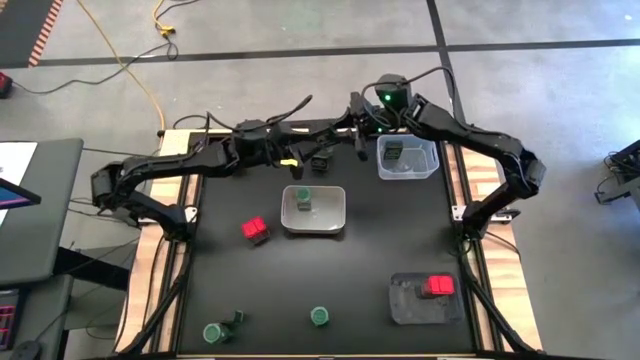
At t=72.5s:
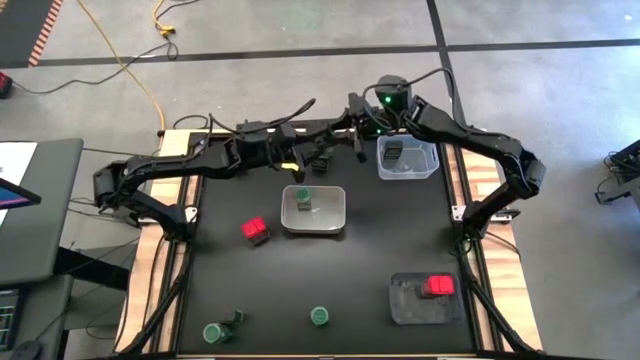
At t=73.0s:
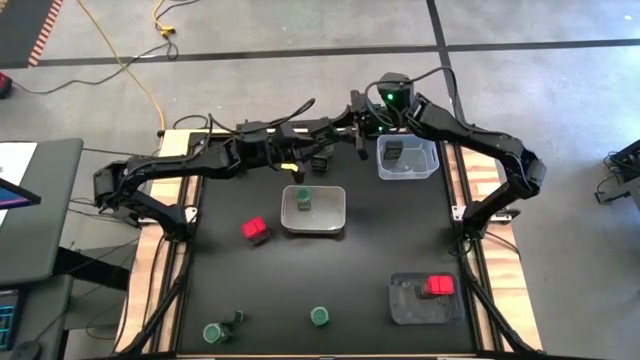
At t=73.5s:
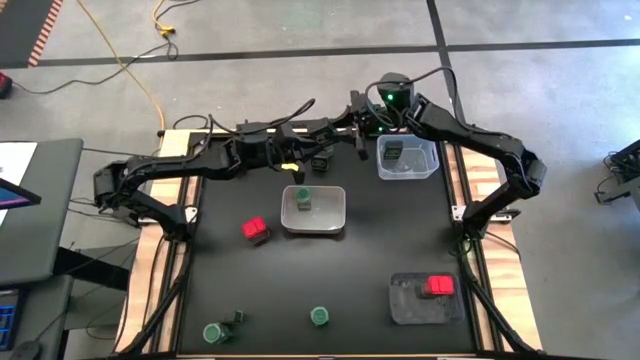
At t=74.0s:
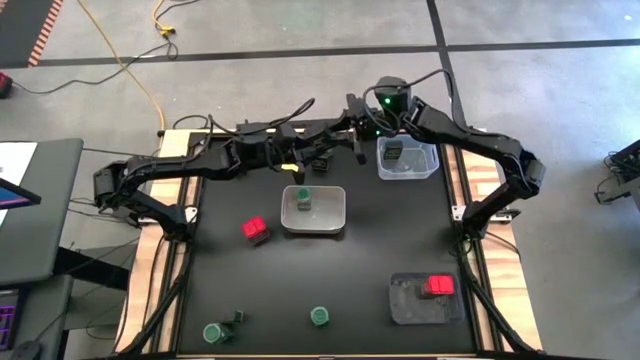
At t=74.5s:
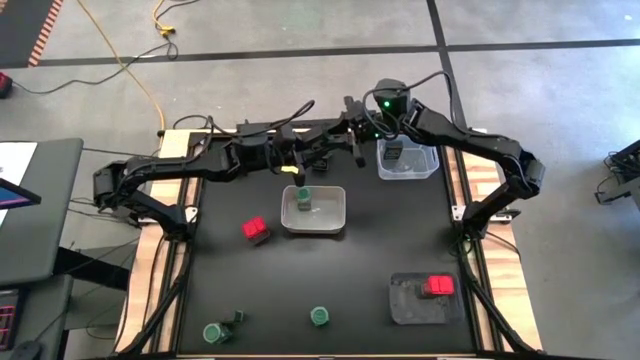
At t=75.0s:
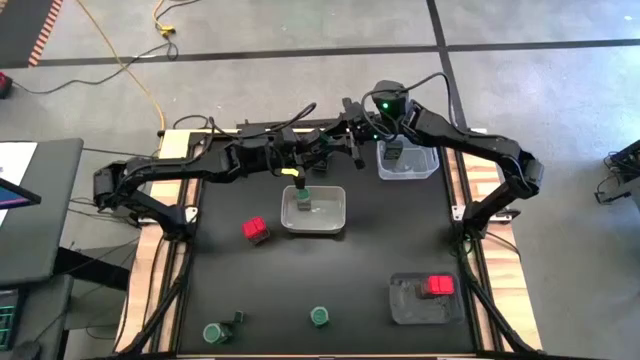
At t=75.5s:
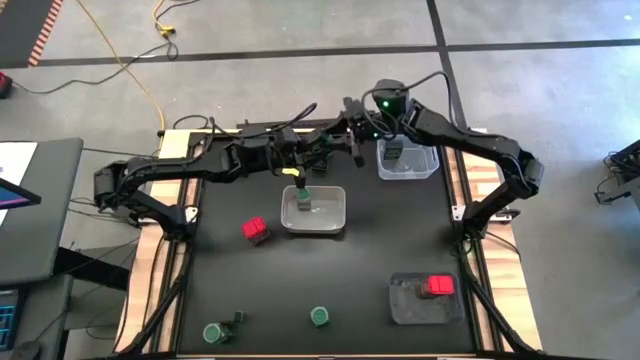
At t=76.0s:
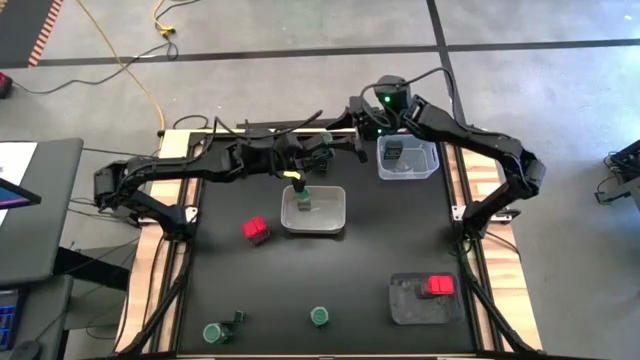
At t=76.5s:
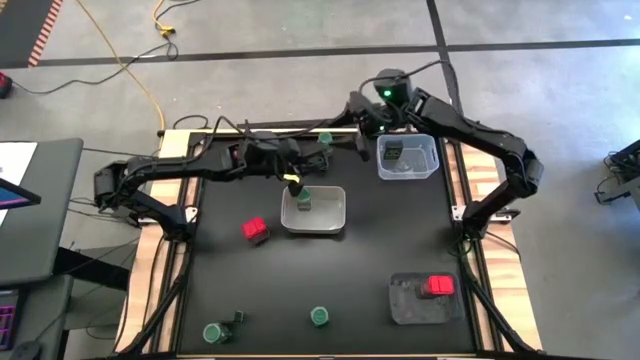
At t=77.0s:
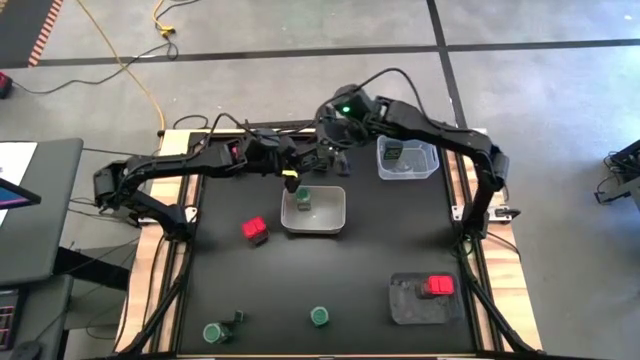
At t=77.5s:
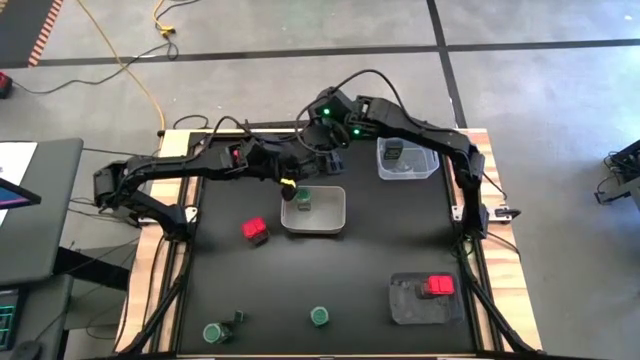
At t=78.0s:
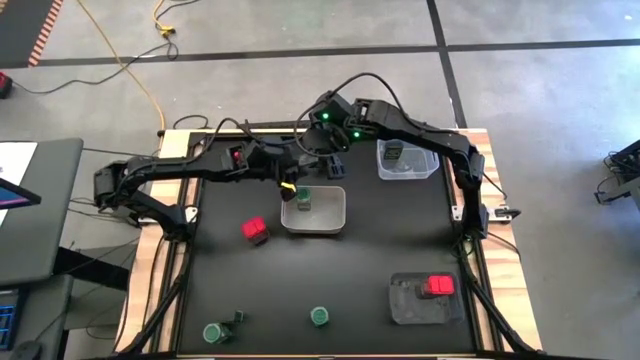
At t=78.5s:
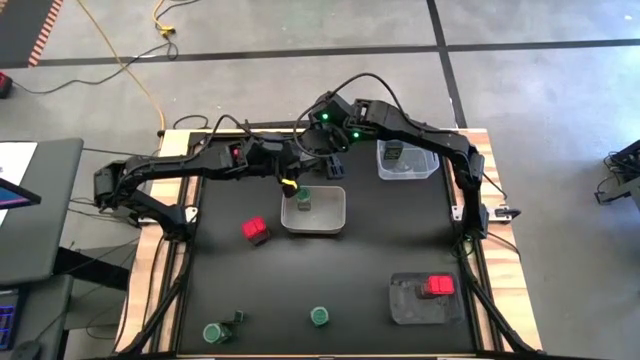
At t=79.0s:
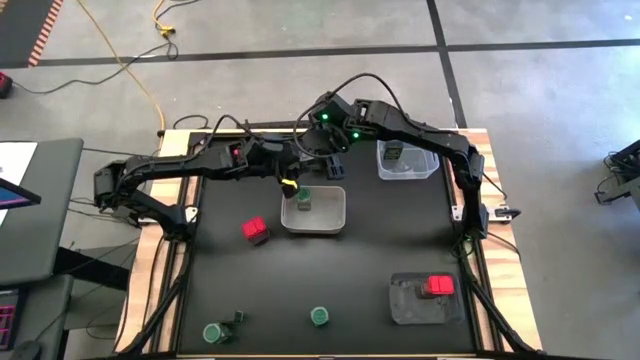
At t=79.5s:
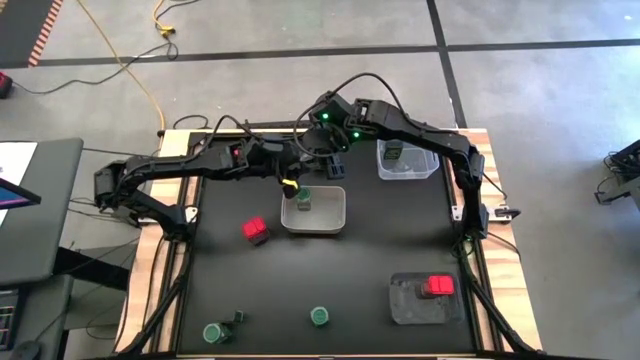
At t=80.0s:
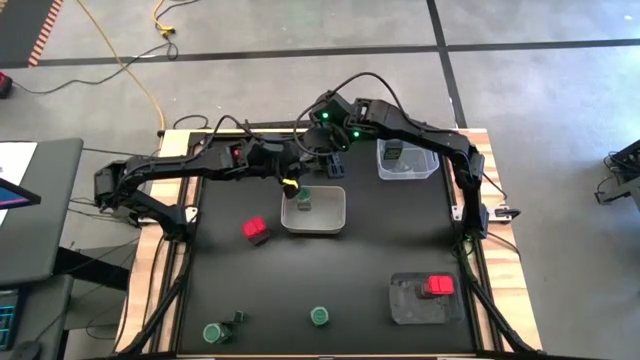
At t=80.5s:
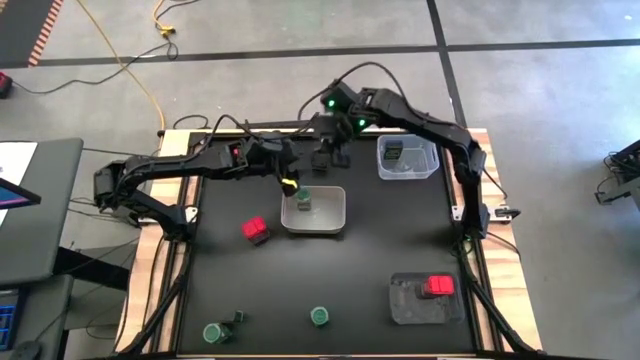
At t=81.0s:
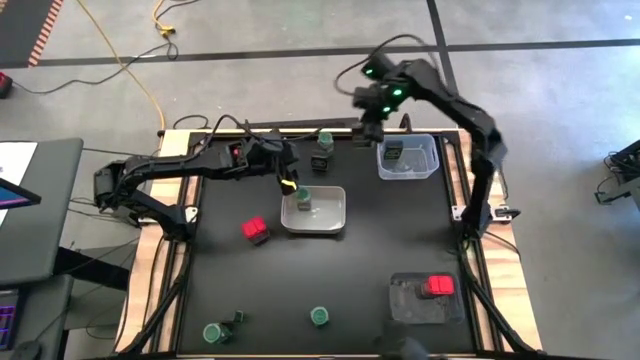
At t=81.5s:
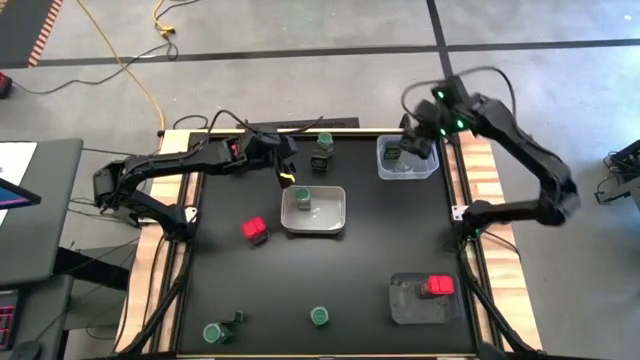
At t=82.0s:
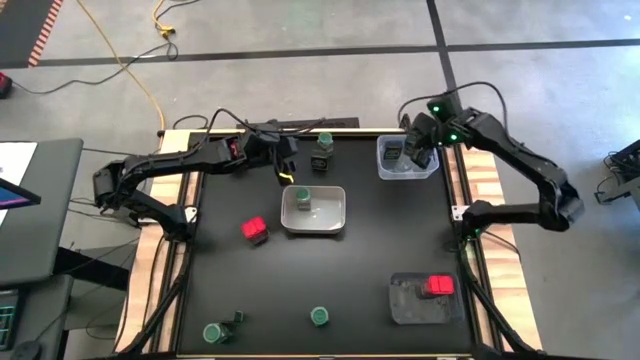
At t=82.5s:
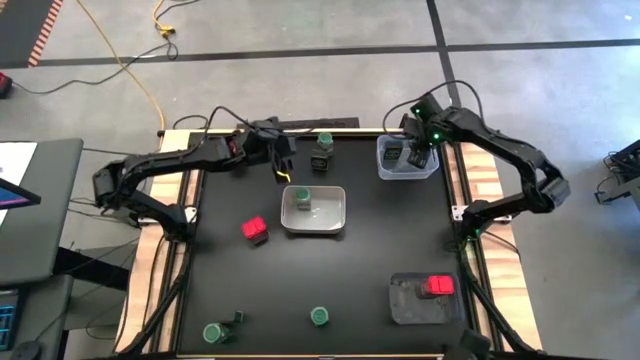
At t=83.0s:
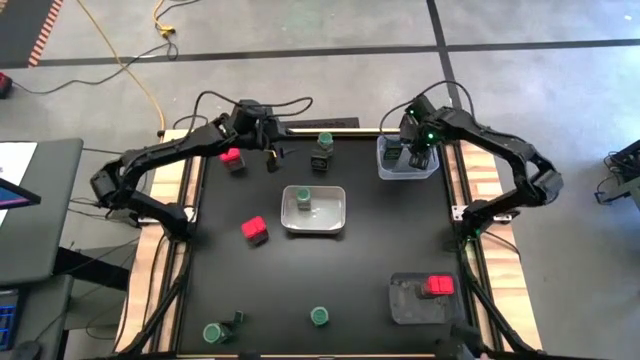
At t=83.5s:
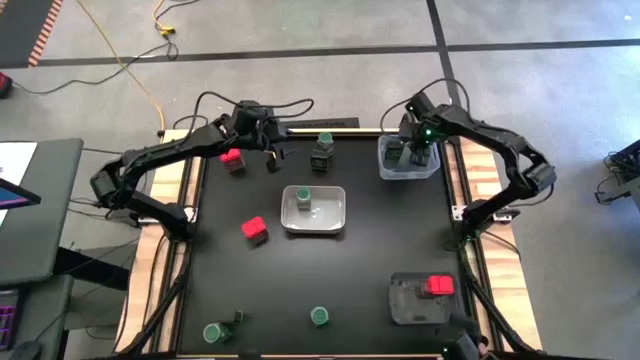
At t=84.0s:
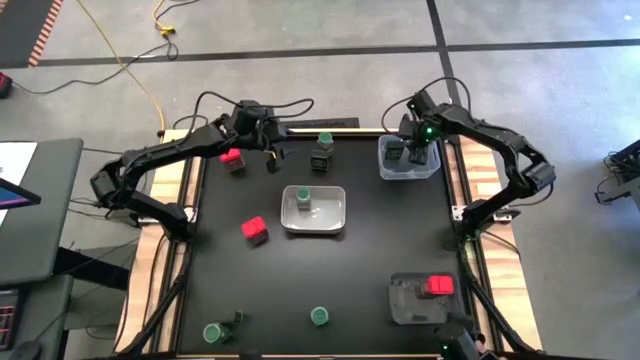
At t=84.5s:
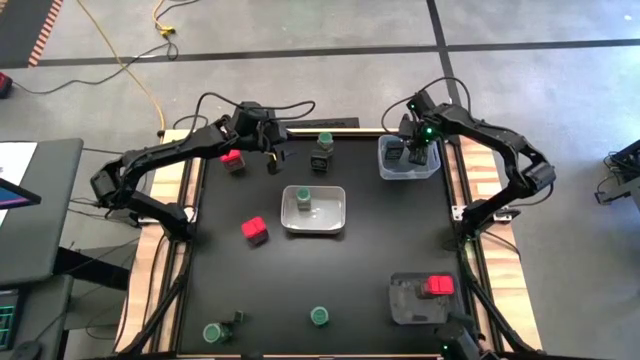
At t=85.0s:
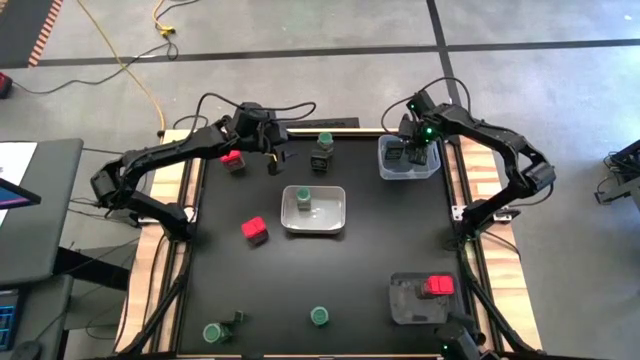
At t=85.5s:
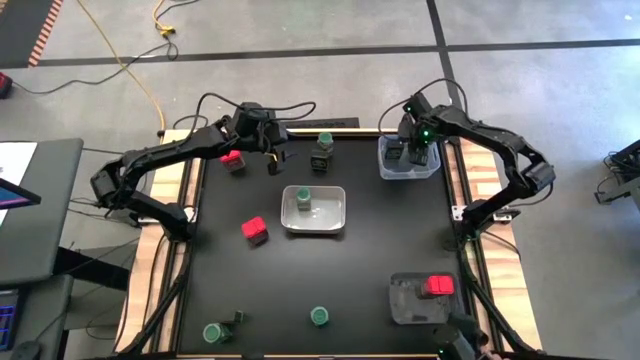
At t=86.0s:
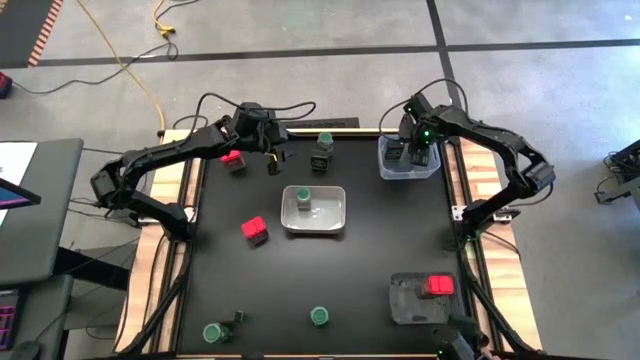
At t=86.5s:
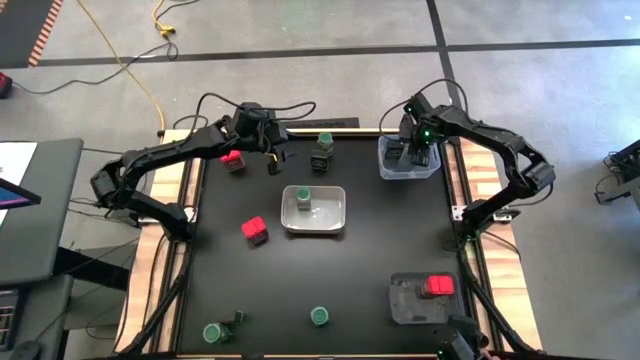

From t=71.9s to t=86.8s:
Task: Sort spices by type
Put the top left black seasoning can into the transparent bin

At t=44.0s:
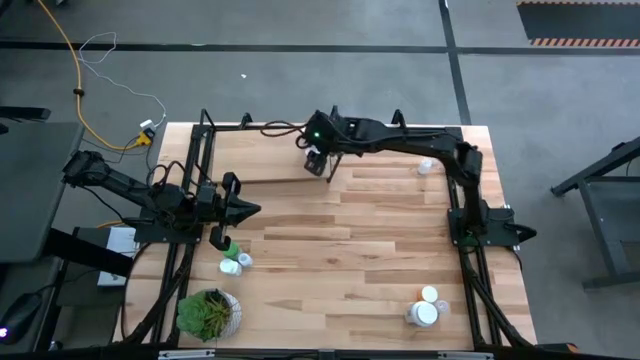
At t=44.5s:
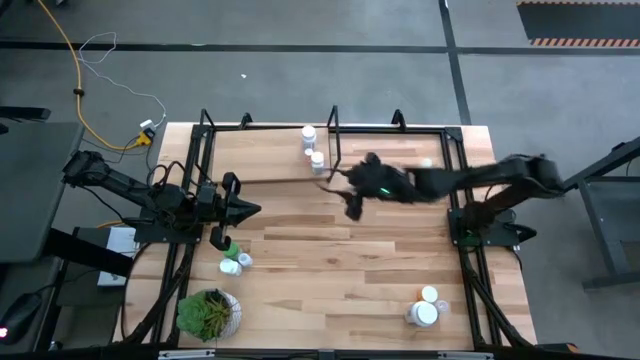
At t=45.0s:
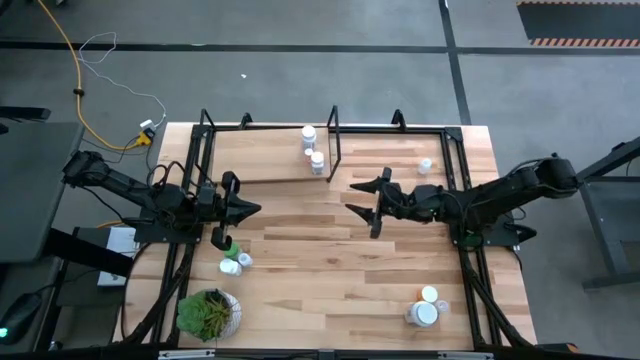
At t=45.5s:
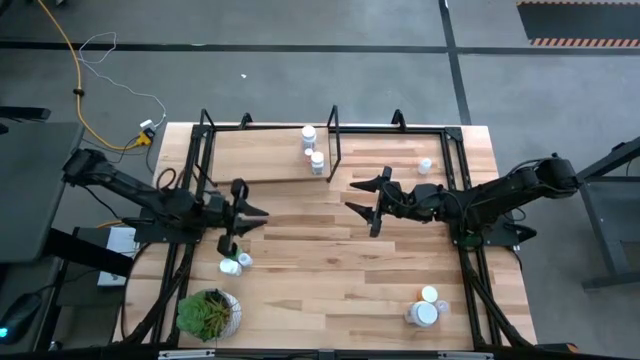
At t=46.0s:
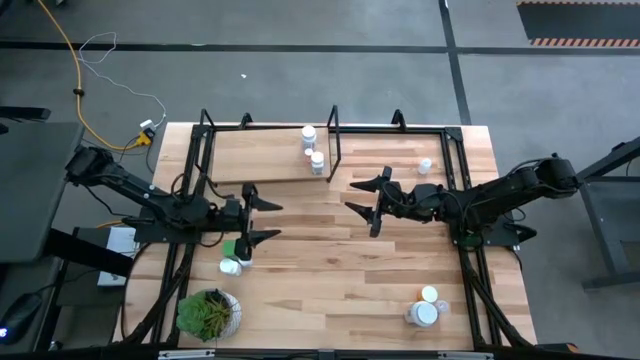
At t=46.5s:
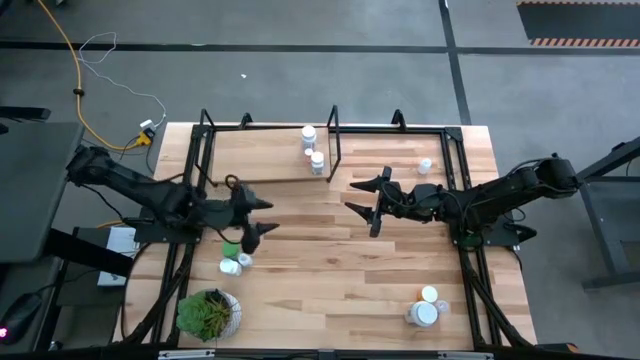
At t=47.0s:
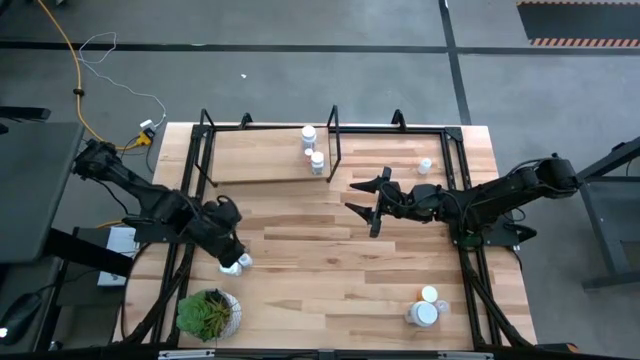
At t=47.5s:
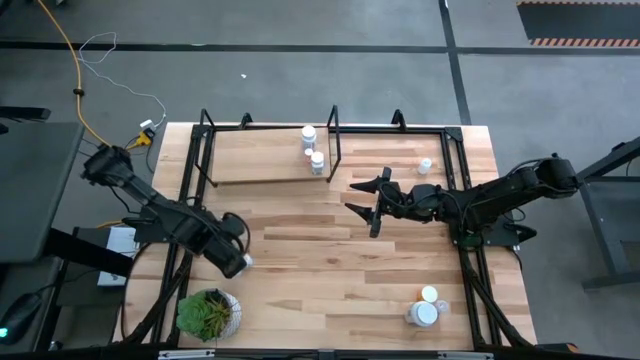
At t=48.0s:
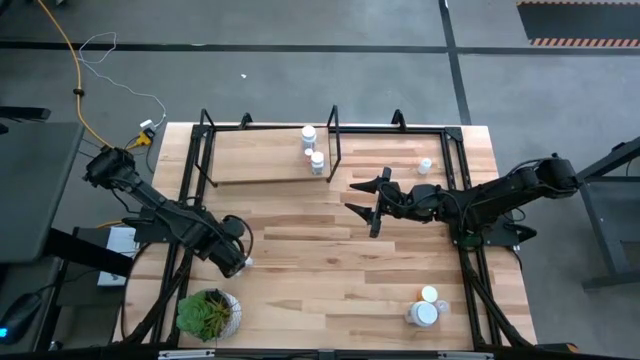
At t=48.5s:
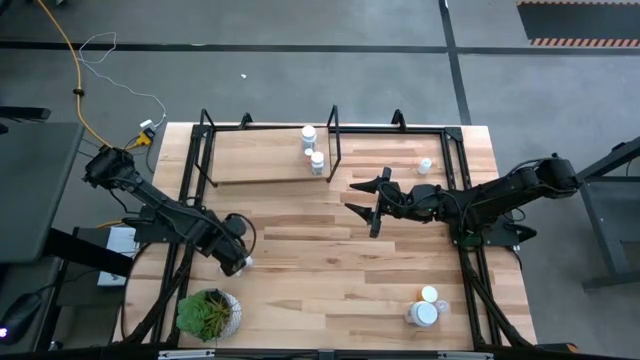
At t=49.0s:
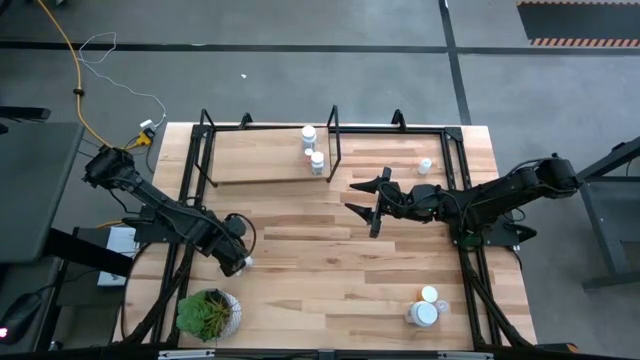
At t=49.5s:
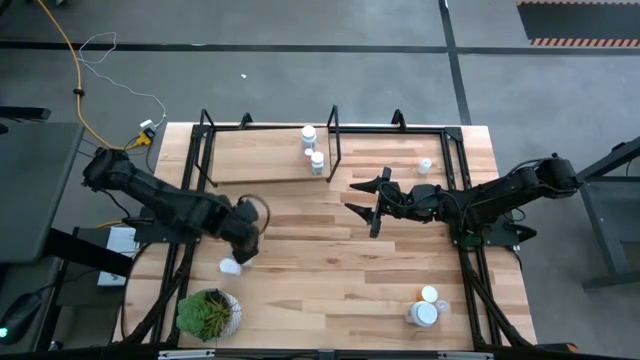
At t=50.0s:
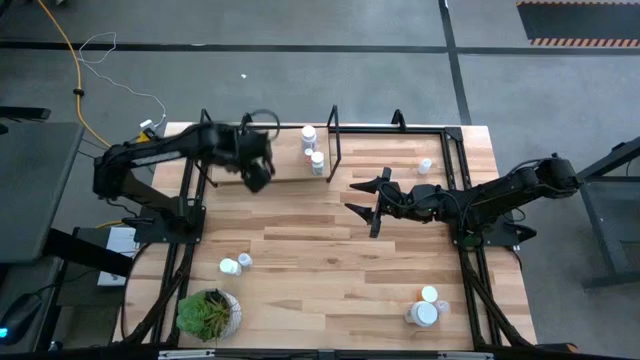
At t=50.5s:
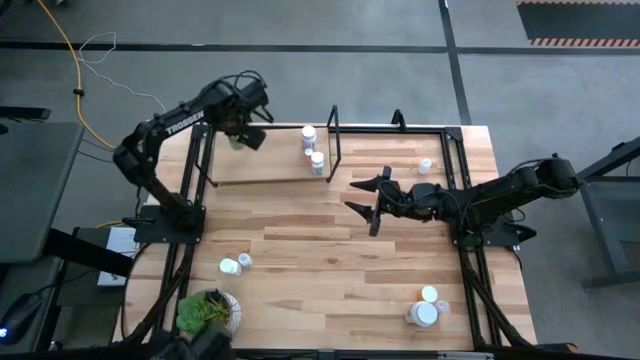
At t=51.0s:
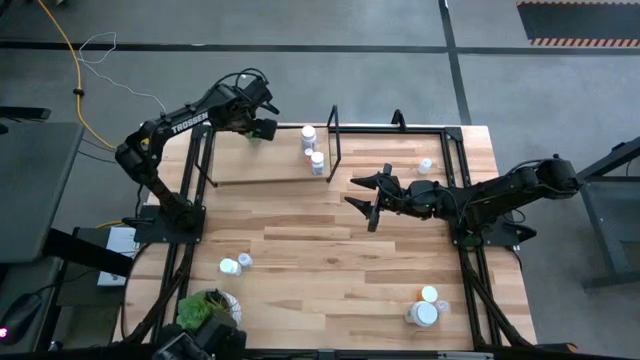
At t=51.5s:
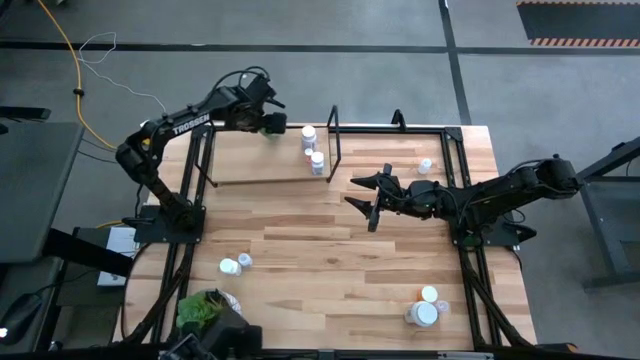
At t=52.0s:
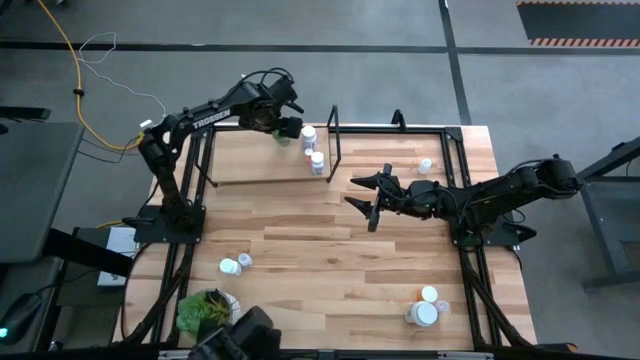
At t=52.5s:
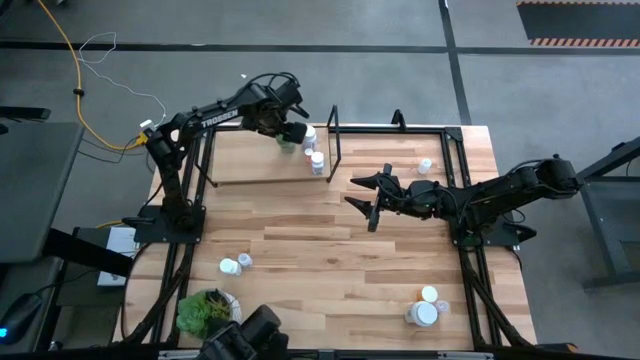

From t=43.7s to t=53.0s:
Task: Pick and place medicine bottles onto shelf by color
Put the green pill bottle on the shelf
